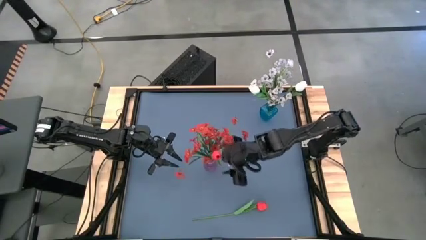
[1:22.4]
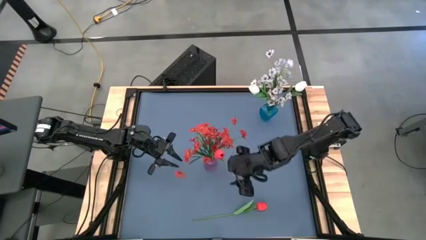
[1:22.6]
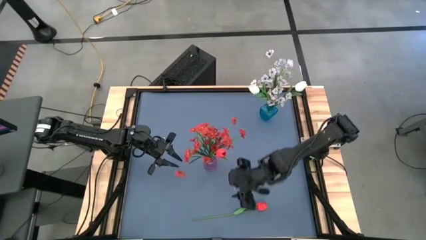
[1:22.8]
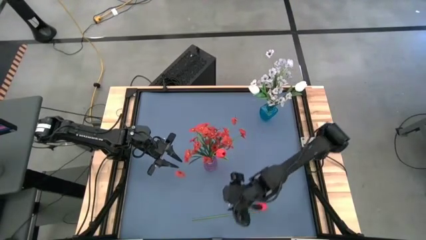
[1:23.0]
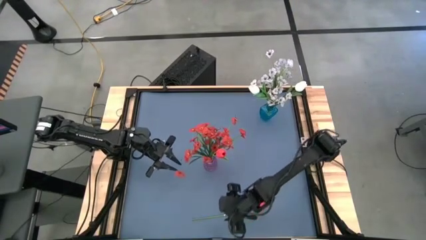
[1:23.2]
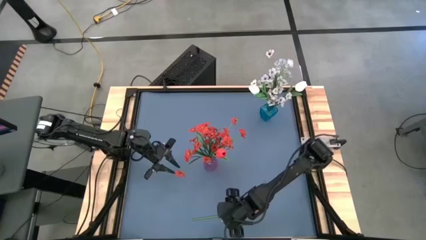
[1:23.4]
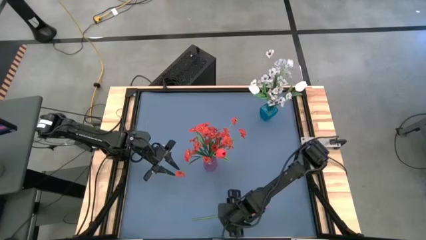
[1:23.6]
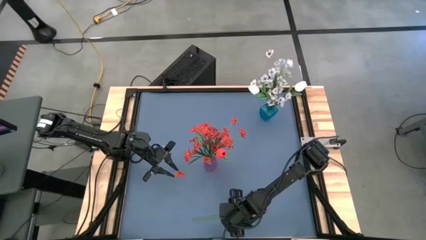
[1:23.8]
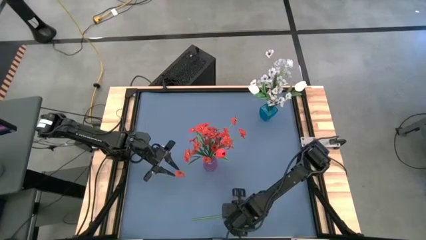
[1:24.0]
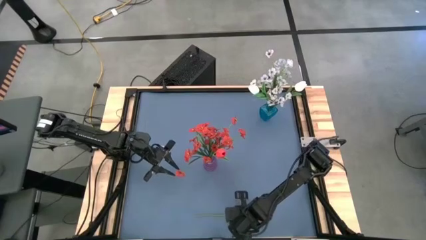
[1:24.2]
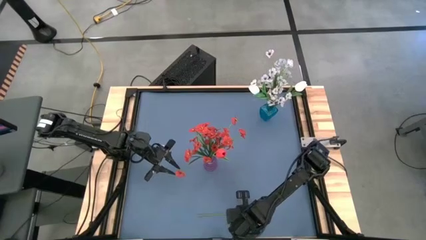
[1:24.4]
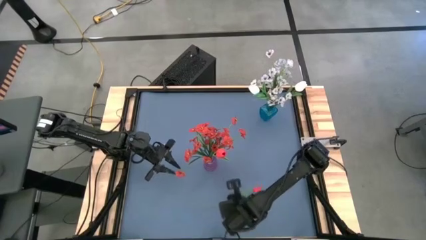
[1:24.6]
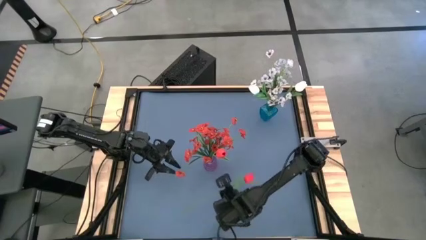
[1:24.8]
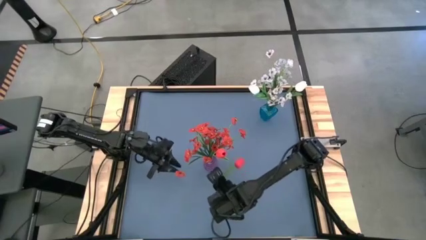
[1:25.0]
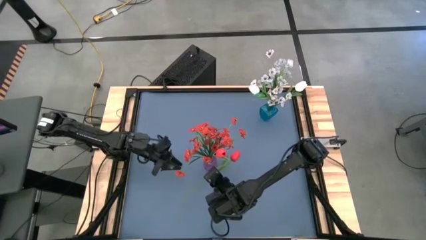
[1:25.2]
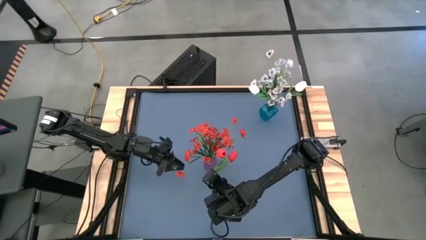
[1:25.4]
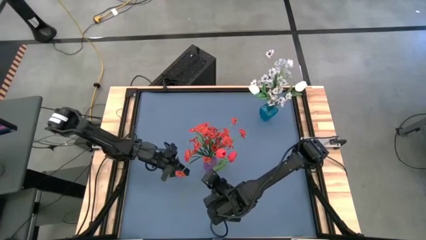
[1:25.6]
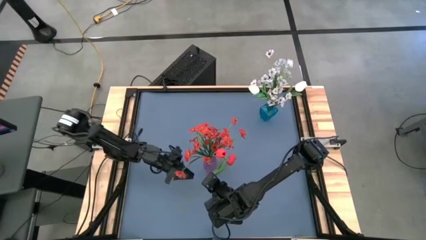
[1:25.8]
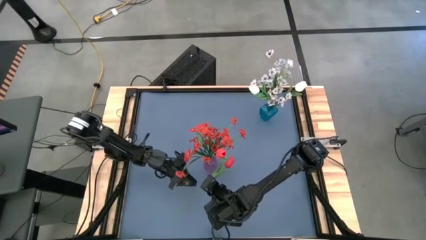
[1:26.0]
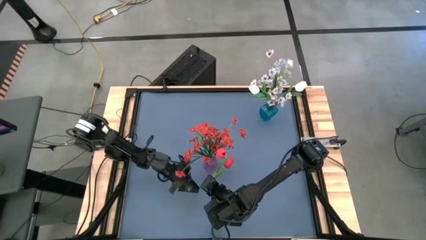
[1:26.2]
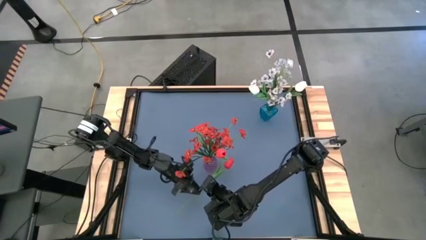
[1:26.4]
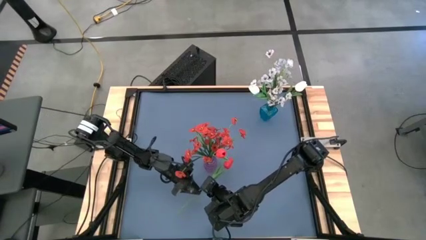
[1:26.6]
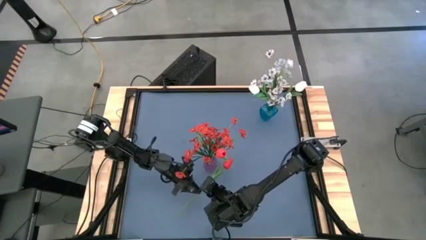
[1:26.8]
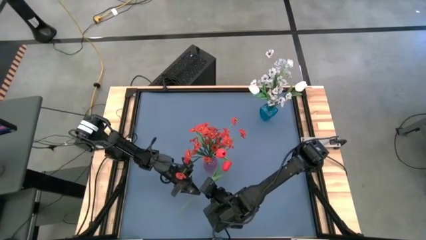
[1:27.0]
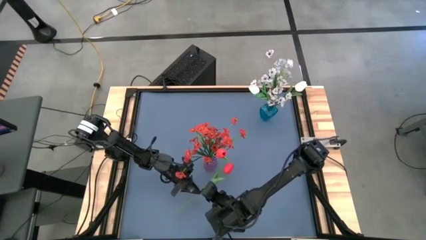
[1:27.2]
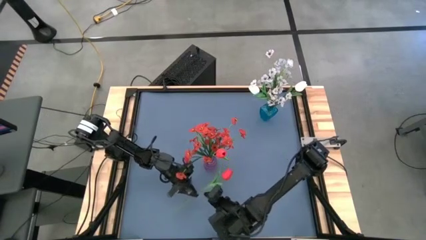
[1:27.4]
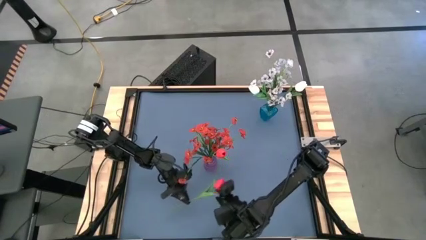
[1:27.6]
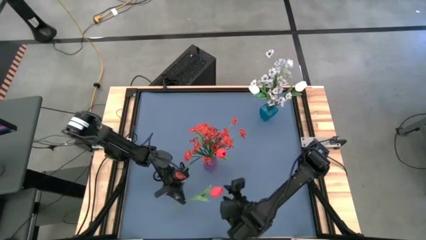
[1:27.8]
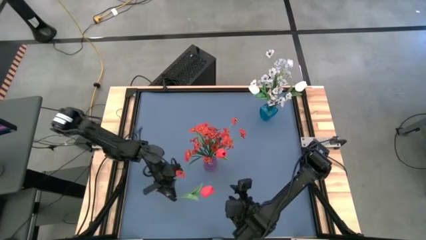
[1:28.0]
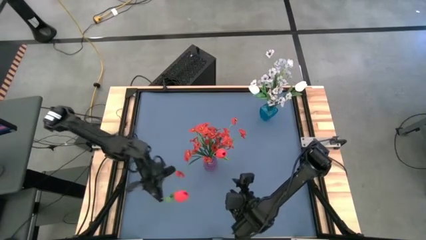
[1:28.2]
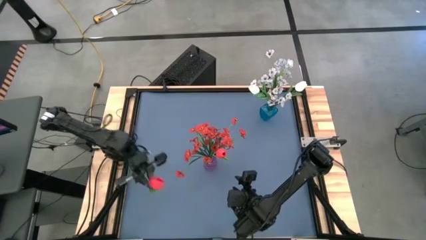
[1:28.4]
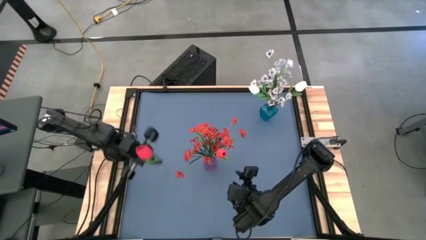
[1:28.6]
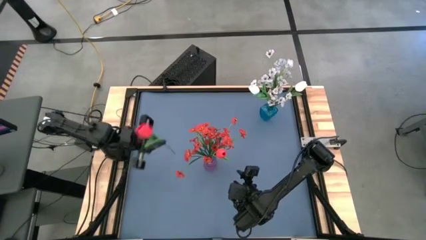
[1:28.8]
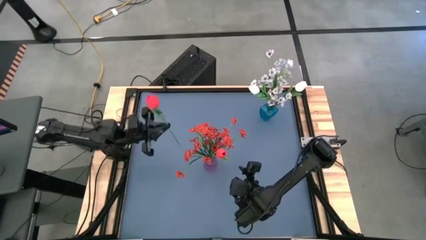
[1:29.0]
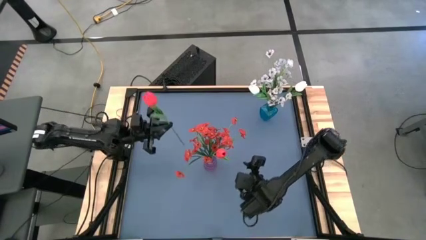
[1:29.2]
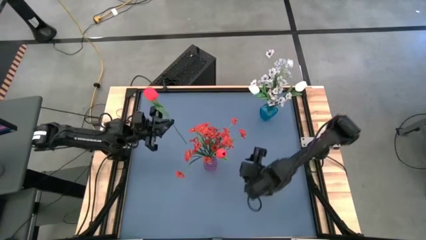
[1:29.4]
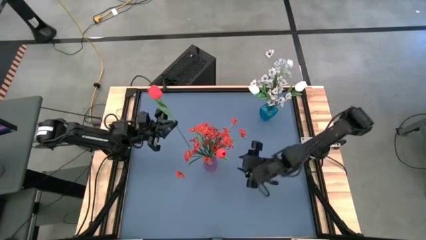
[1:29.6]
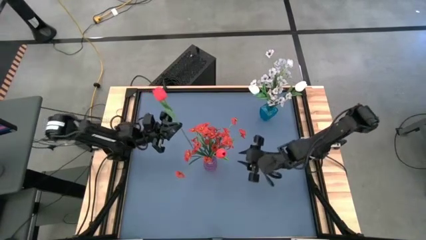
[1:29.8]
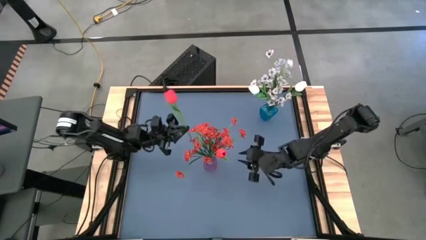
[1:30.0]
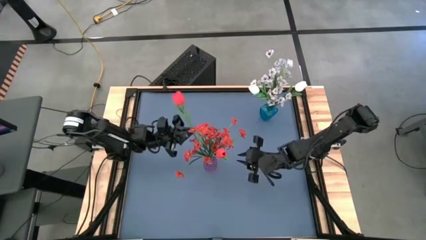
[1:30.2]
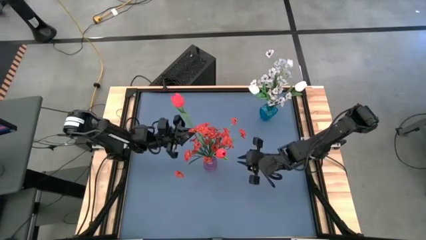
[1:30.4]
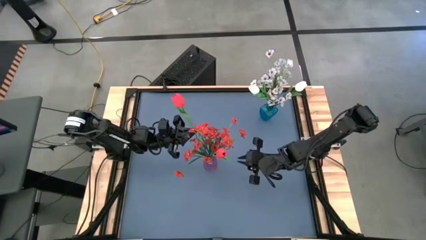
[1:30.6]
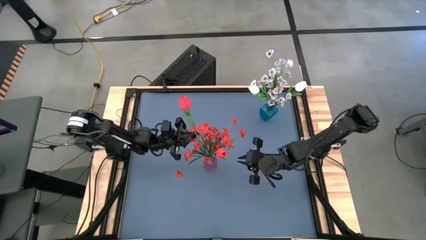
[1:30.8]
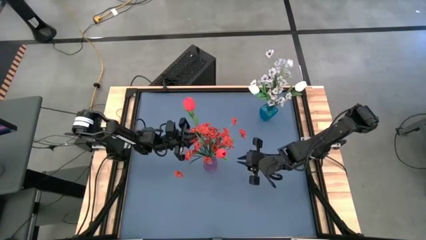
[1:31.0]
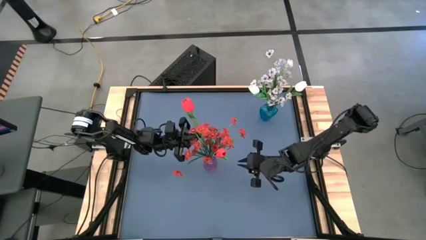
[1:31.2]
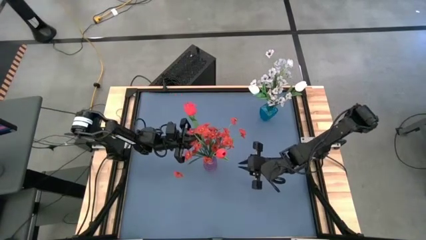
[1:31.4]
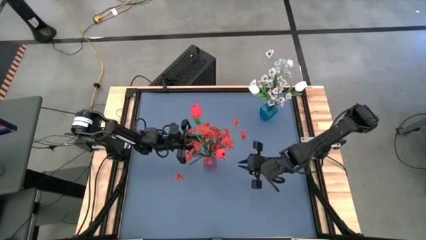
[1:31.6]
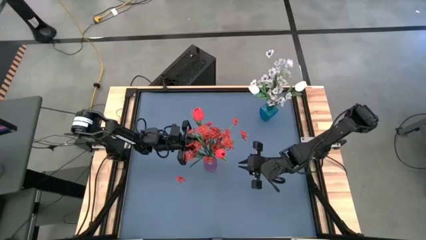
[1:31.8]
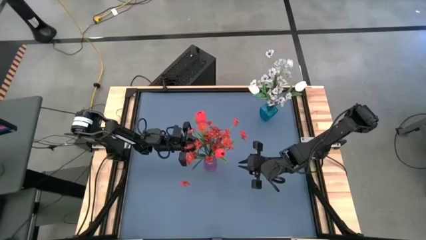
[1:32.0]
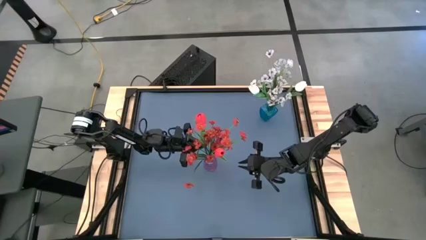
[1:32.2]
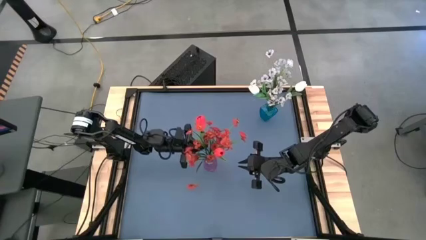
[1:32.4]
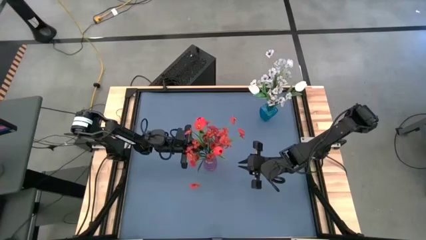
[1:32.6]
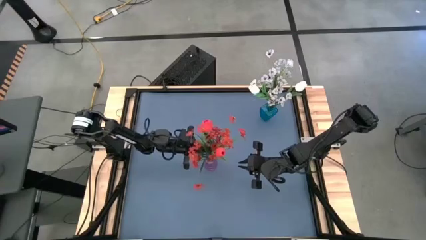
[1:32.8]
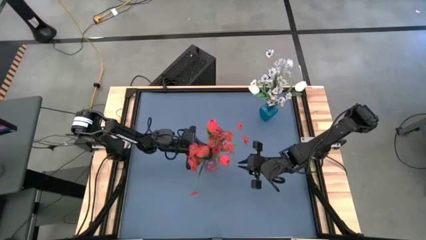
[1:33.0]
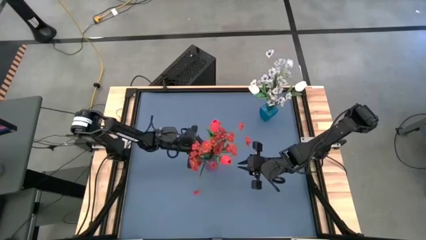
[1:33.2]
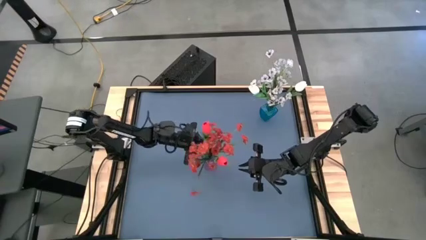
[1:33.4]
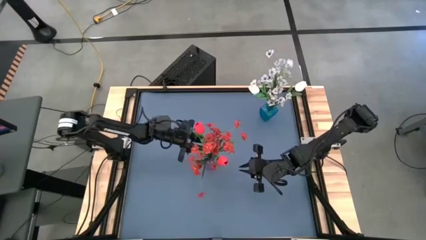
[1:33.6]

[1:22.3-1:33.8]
Task: Sort flowers into vase by color
Put the red flower into the purple vase

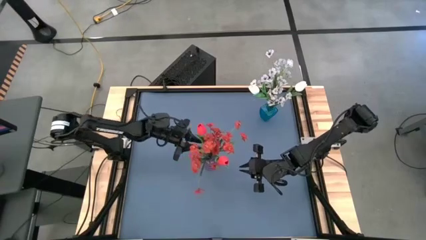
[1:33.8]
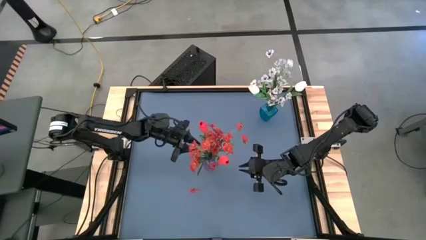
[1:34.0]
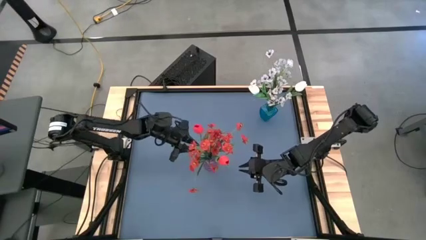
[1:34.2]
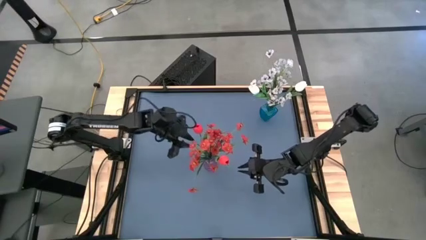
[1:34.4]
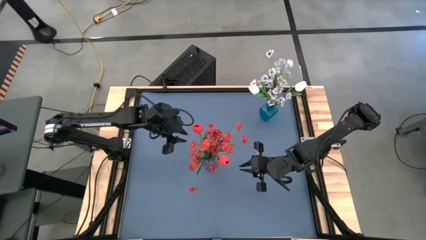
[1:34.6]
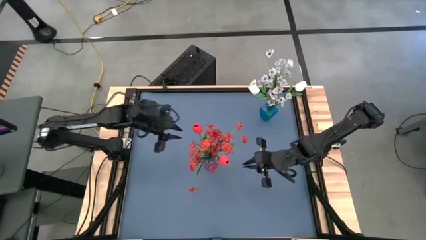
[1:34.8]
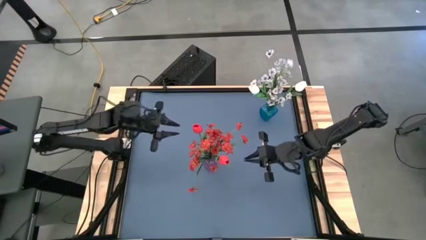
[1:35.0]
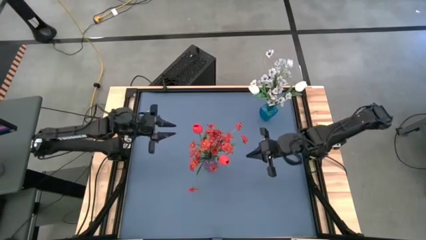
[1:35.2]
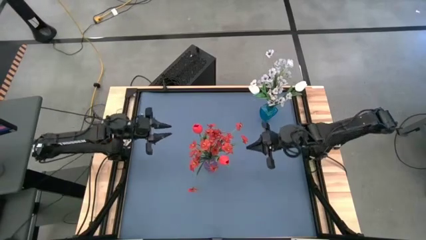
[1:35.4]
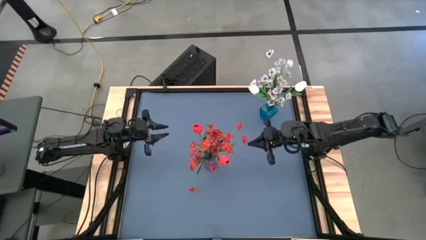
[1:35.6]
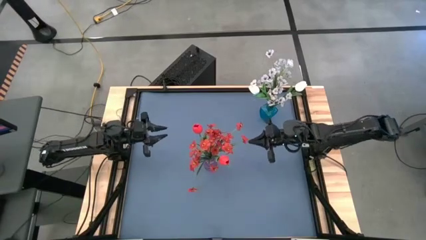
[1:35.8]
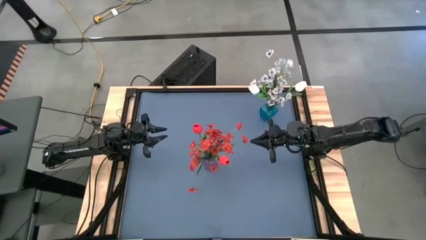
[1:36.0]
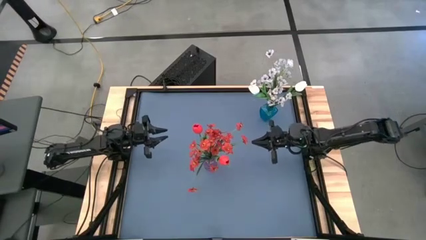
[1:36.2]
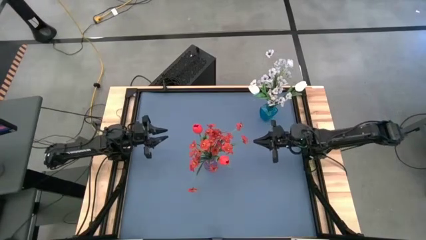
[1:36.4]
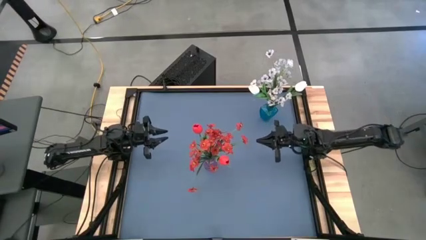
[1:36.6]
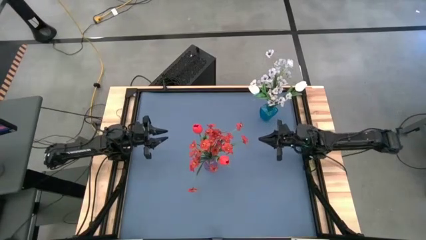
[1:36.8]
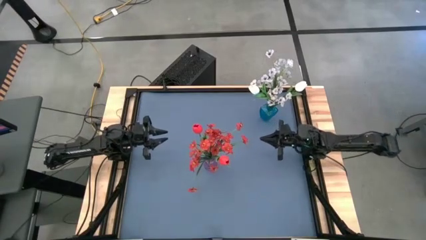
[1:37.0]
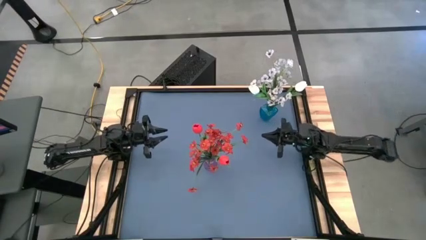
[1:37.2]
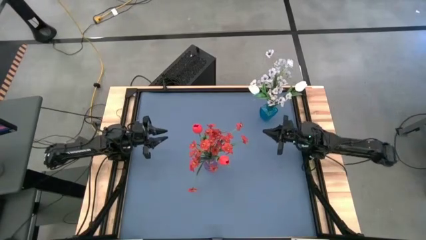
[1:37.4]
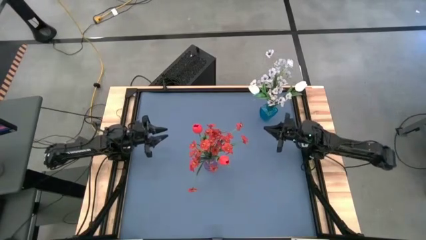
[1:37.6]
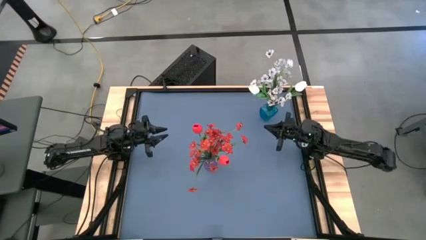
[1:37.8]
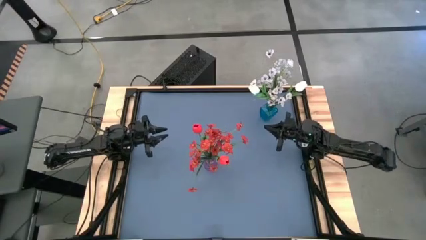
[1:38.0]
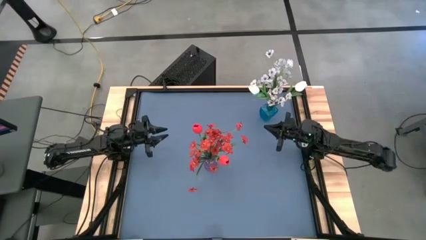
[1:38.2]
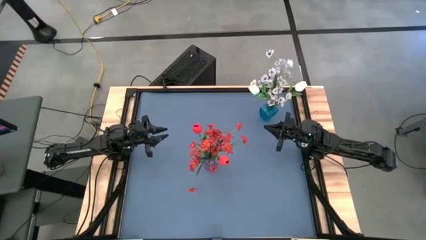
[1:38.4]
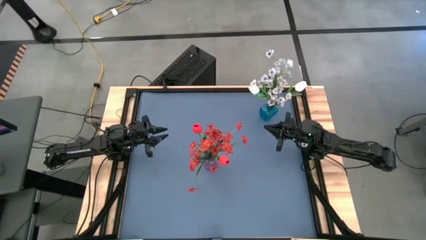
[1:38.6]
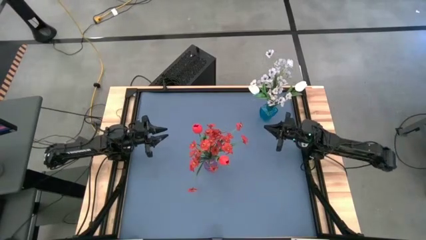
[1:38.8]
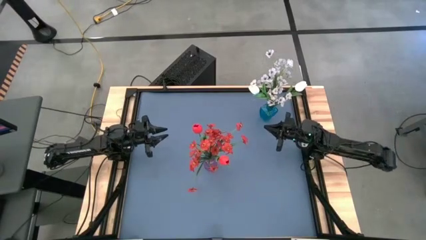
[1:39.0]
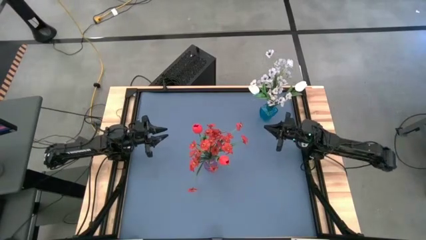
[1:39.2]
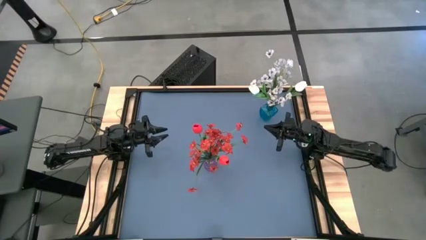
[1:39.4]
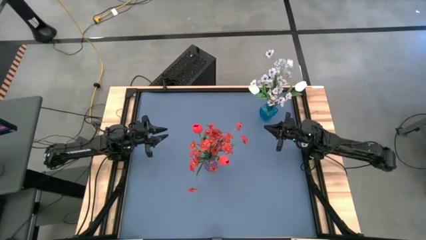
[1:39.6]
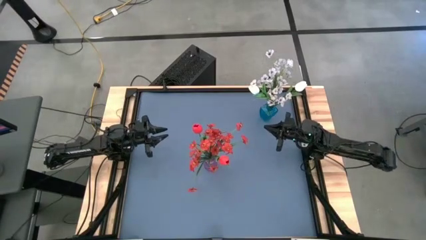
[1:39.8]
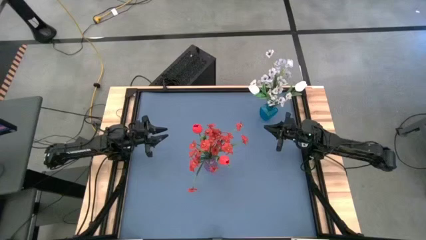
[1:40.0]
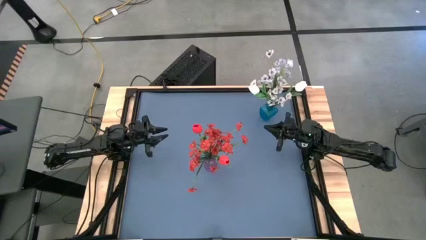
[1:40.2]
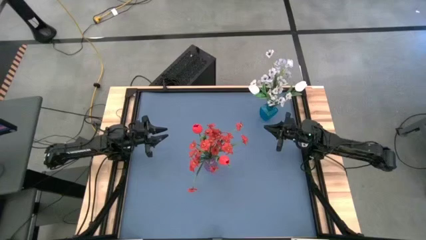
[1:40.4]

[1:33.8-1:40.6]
Return to Home Position
